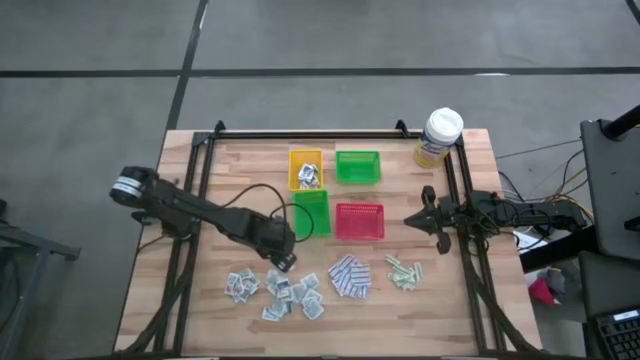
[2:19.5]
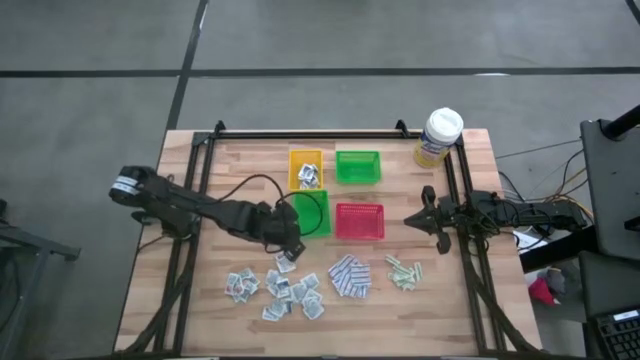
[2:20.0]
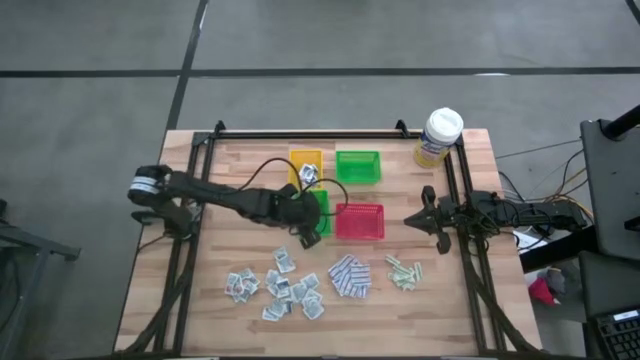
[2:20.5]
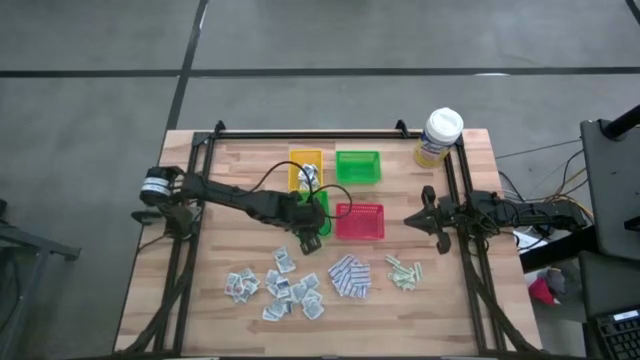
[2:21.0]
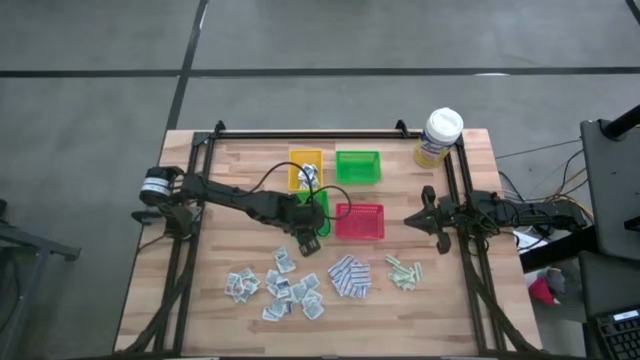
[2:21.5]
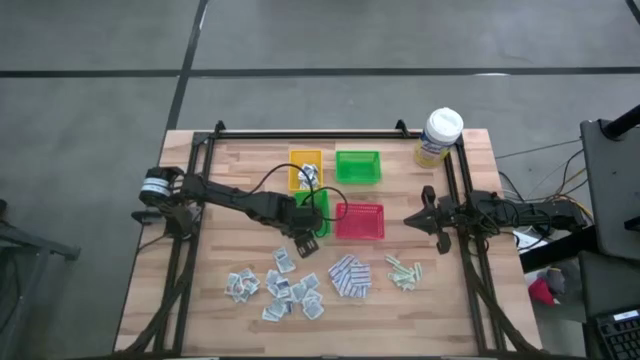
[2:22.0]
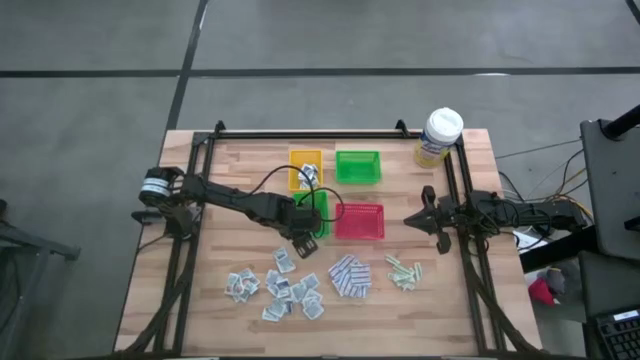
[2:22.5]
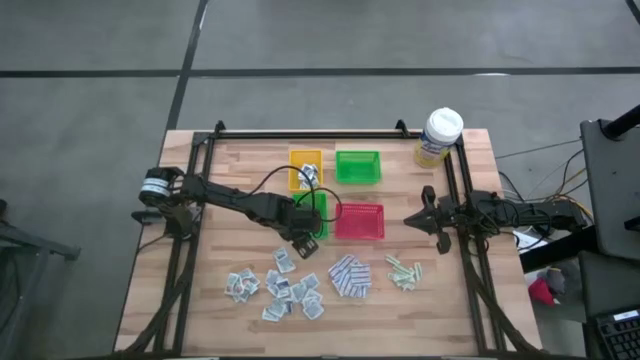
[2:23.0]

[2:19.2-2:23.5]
Task: Pick & Place First Aid Supplies
Adjust the green bin on the table

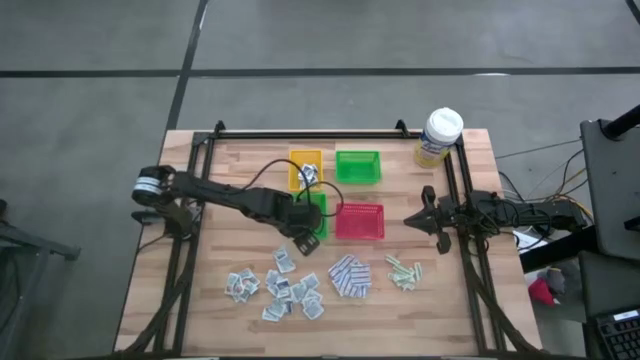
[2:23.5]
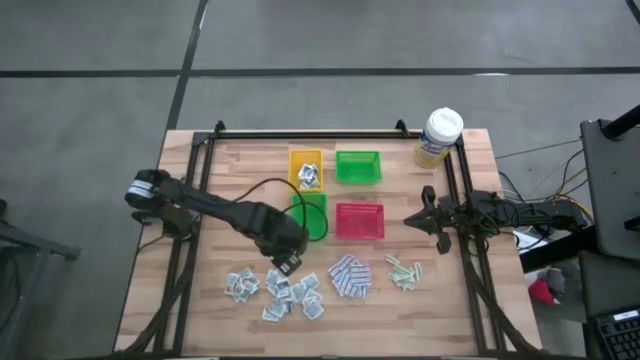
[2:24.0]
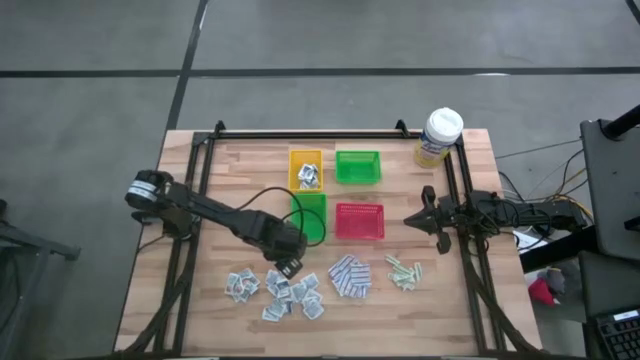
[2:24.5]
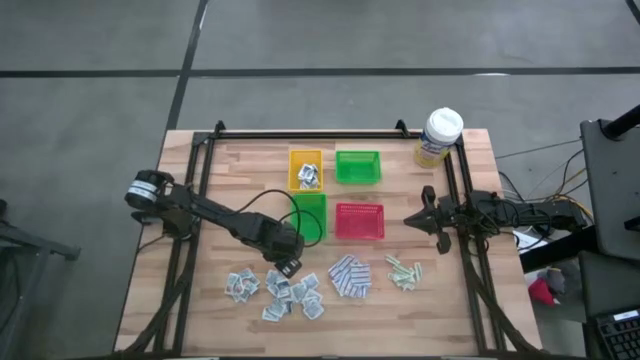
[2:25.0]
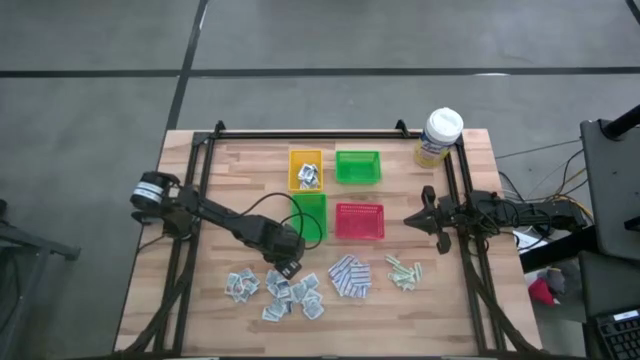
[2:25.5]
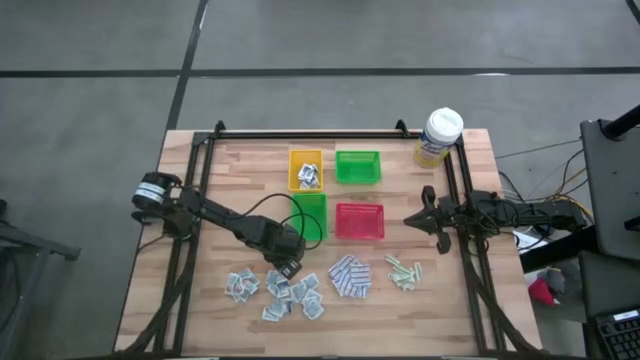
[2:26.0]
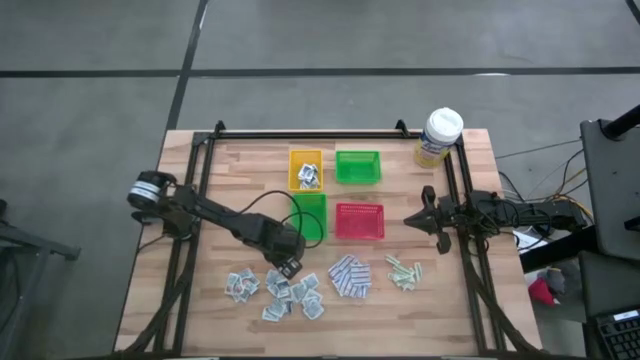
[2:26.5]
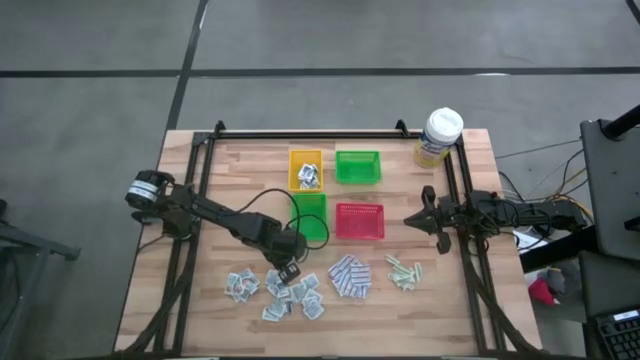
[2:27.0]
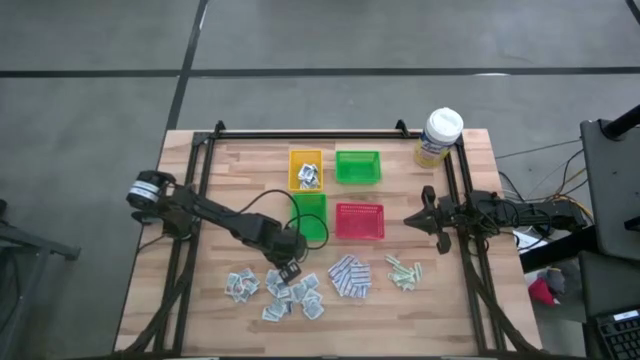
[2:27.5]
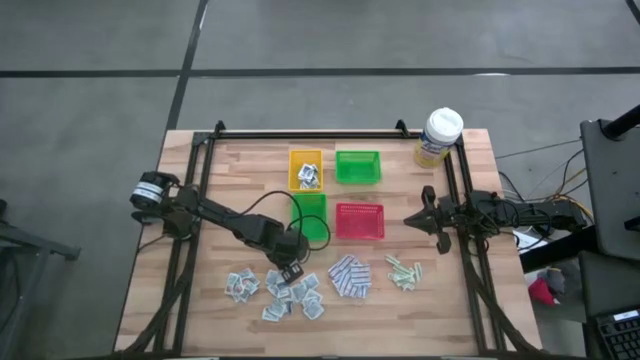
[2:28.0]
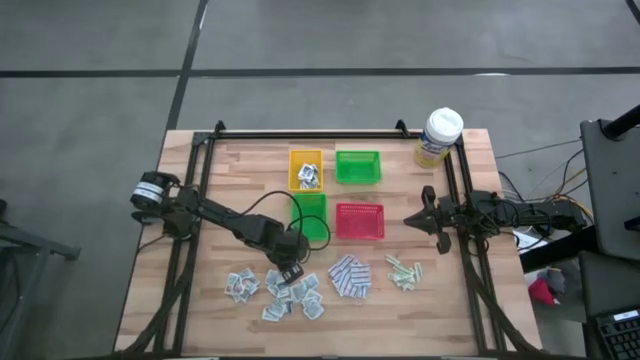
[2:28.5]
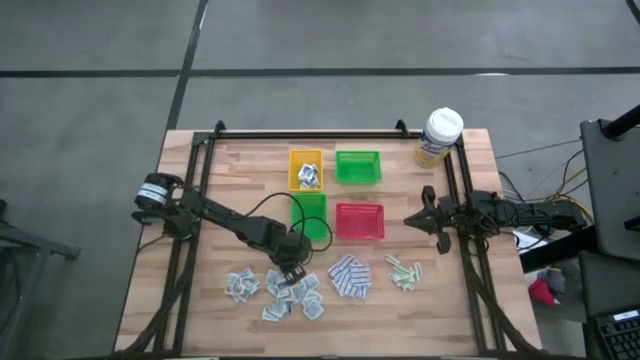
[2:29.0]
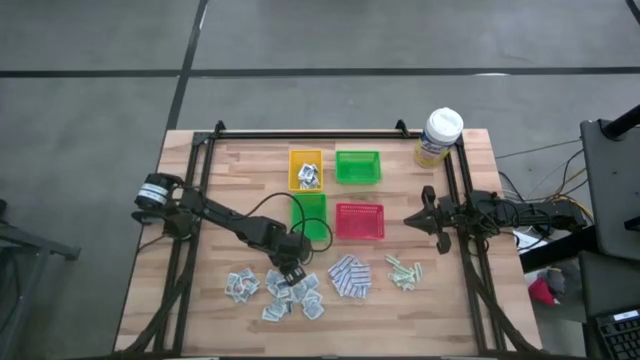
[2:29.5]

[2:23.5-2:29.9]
Put the blue alcohol pad into the yellow bin

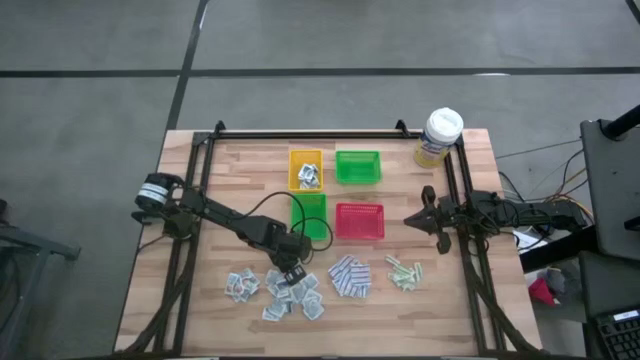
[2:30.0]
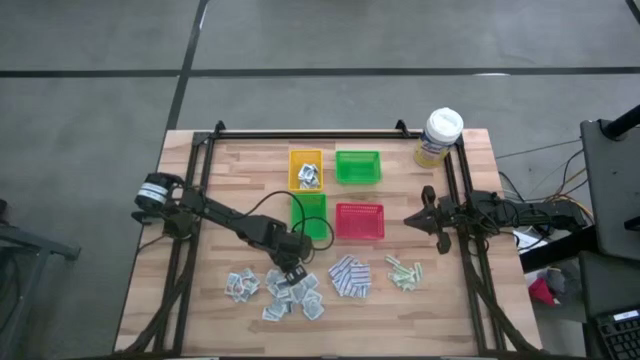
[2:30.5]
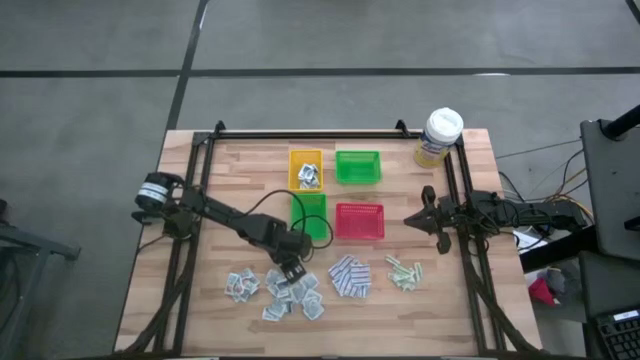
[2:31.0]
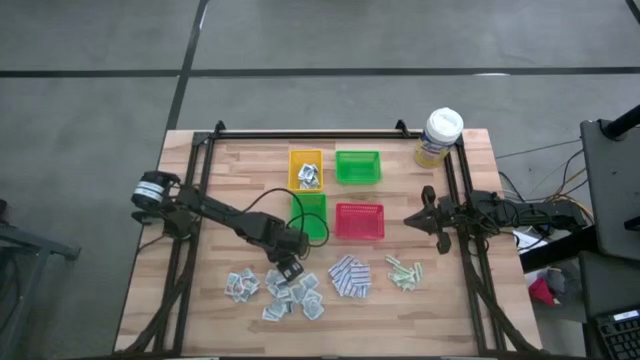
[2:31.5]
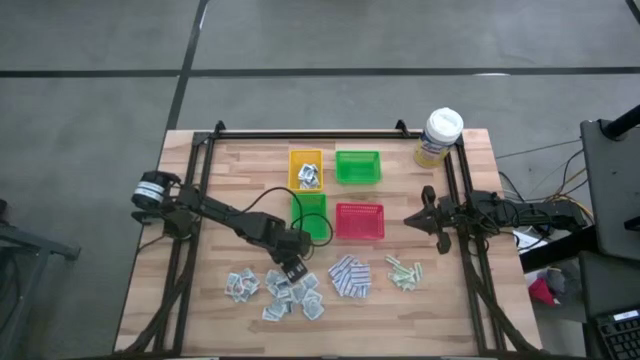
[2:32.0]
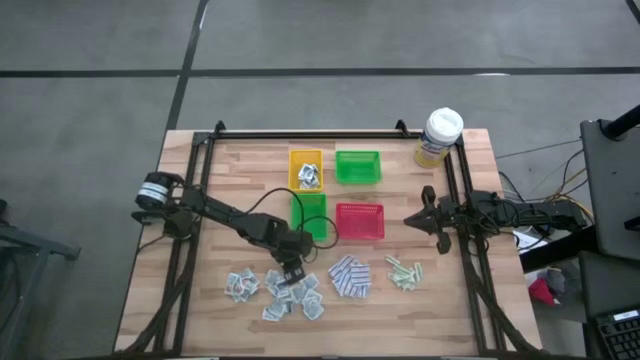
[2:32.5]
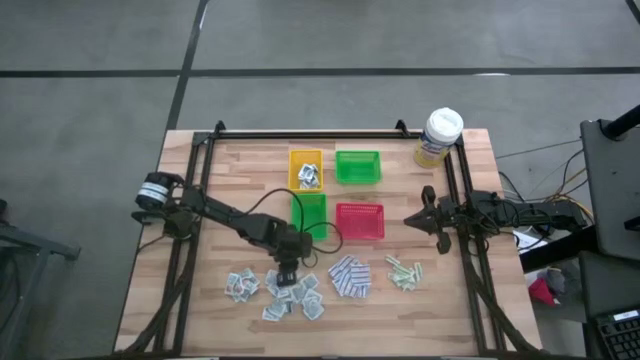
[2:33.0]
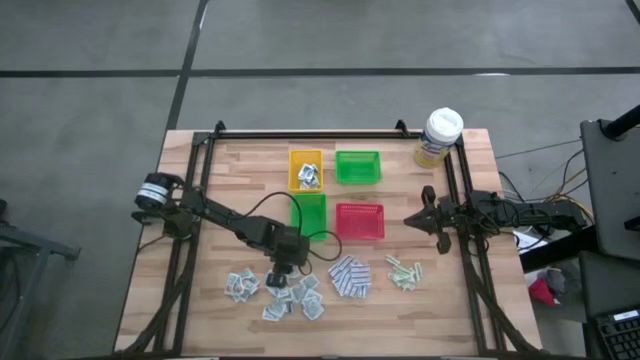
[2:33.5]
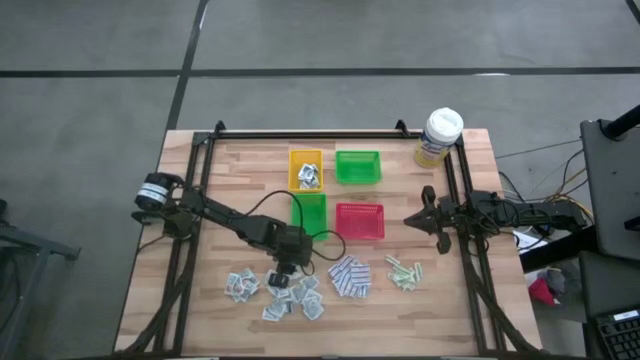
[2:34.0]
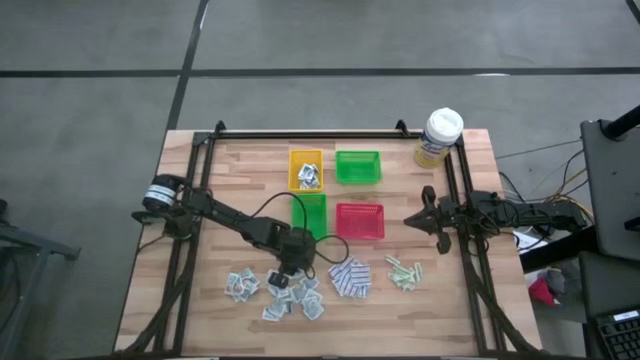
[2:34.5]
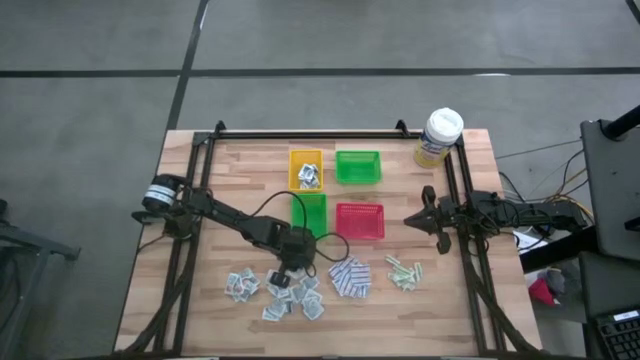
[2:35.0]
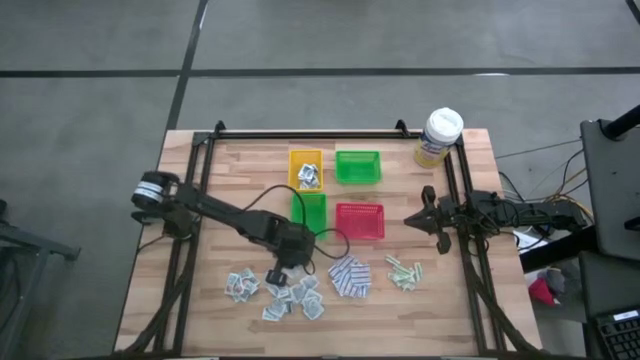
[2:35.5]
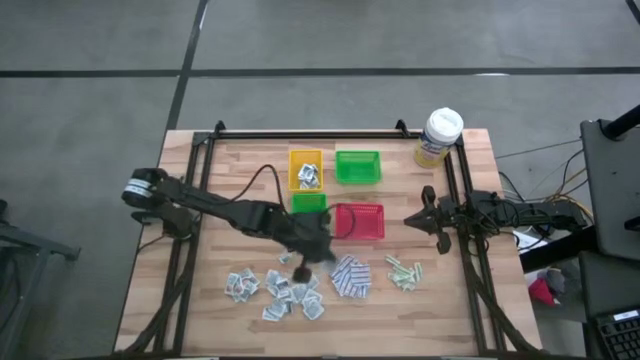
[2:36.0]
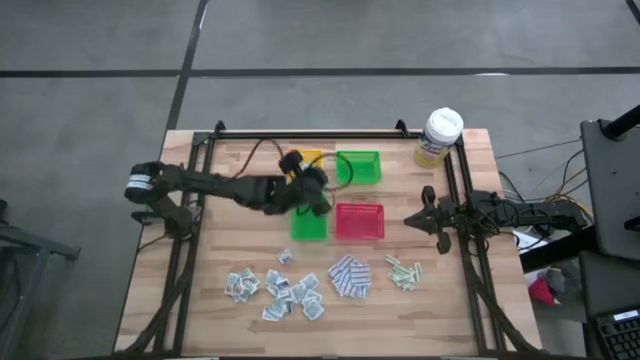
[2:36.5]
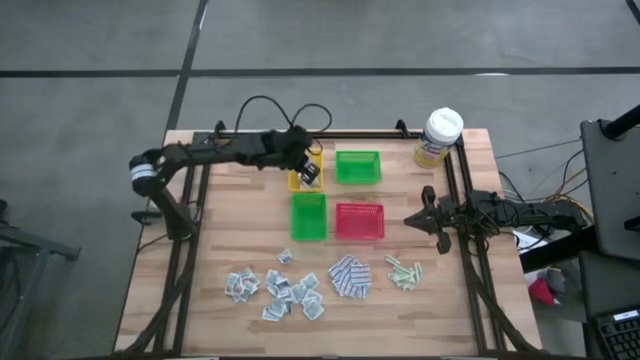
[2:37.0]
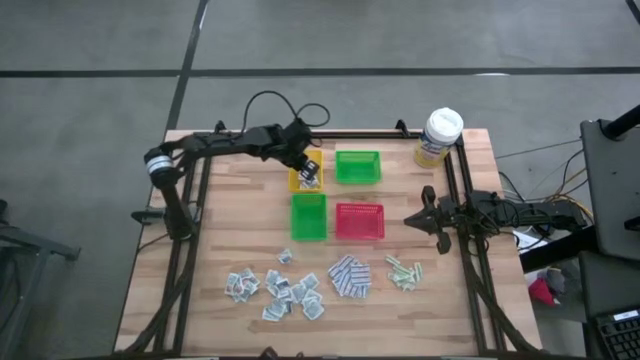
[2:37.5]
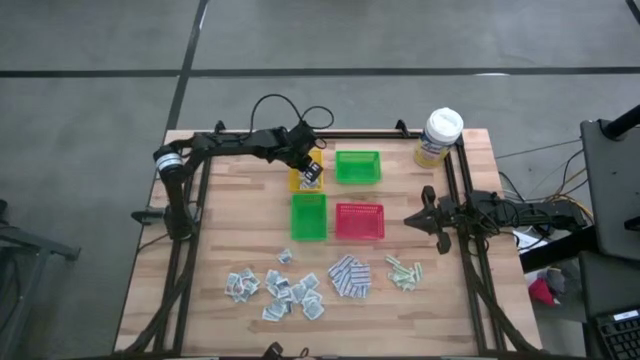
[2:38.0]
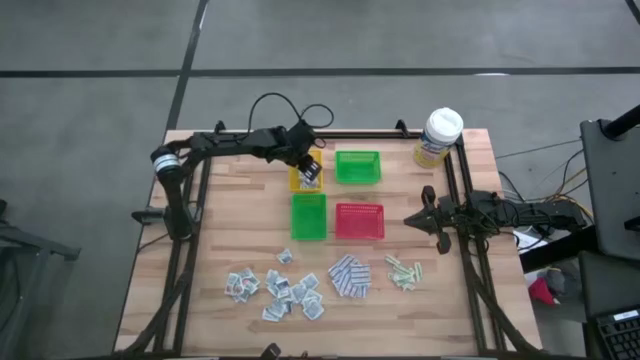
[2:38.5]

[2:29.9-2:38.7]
Put the blue alcohol pad into the yellow bin

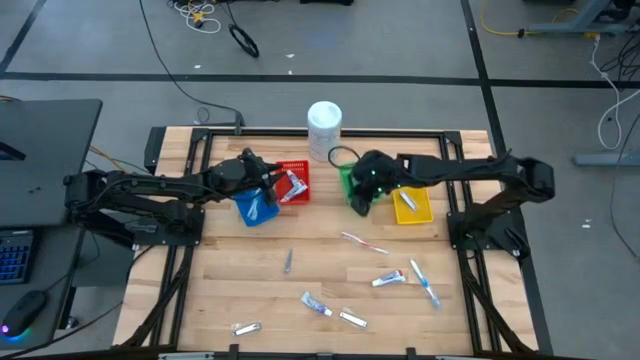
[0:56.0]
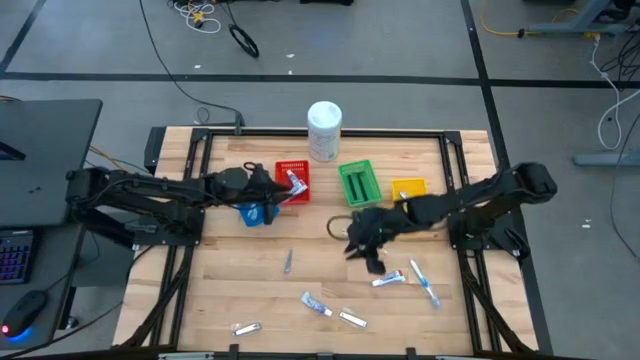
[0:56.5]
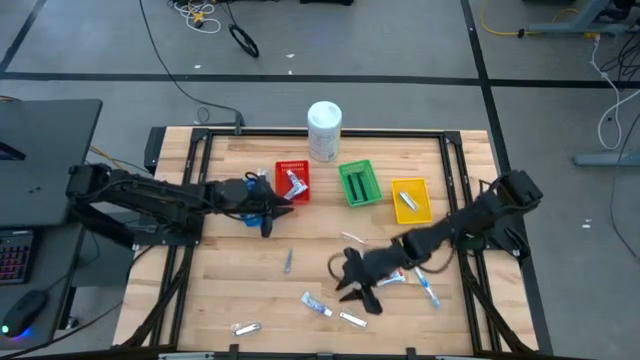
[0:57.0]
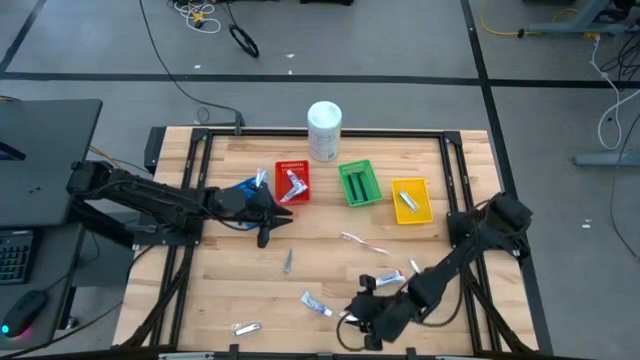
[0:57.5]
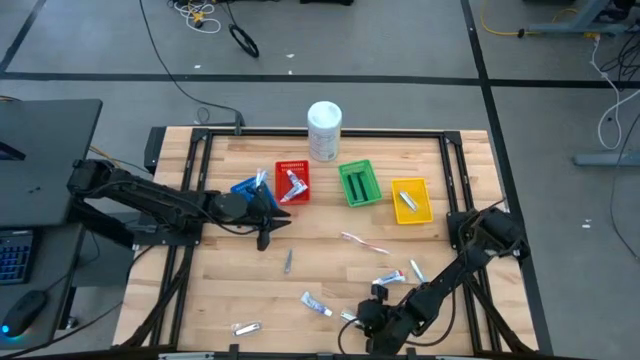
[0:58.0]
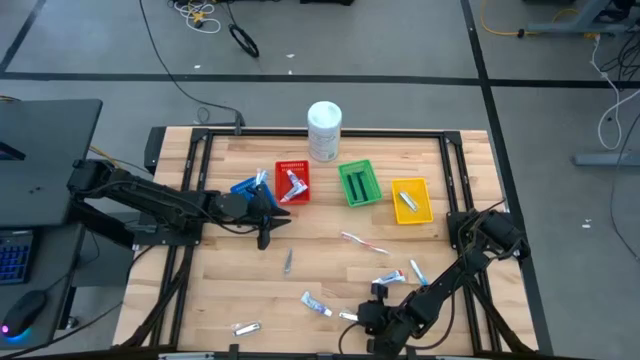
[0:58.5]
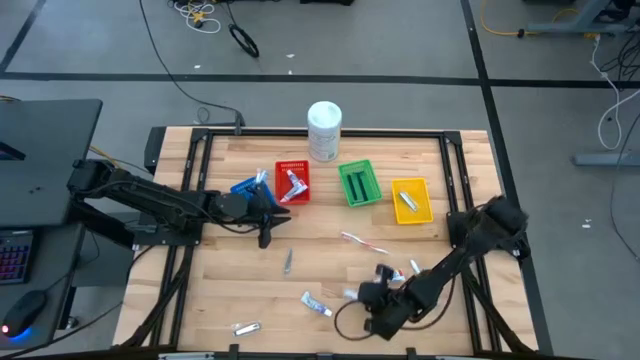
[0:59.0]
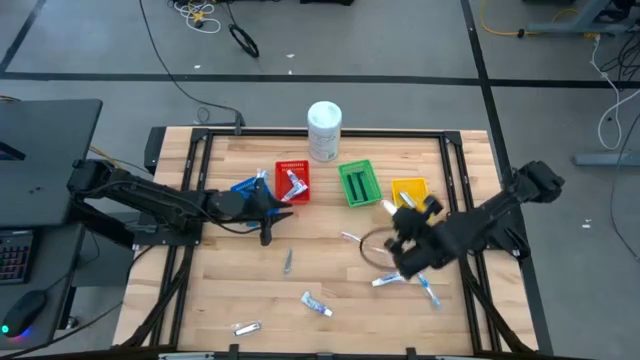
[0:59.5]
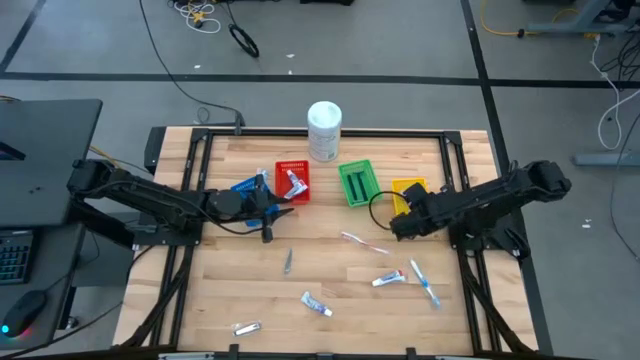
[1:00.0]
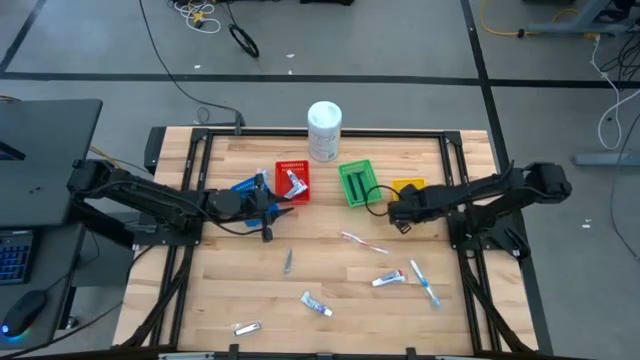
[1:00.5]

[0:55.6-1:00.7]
Task: Pick & Place Travel size toiletries
Put the nail cutter into the yellow bin
